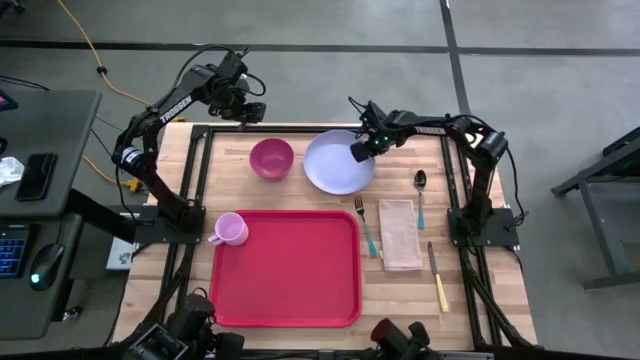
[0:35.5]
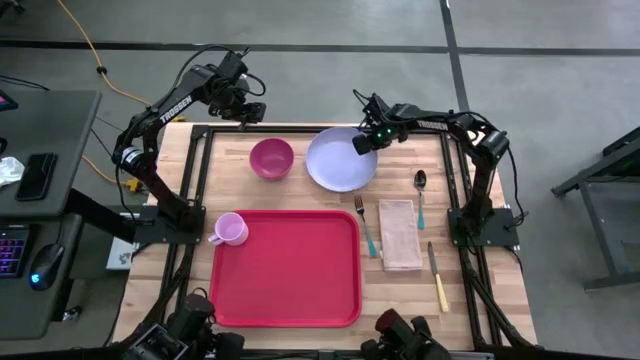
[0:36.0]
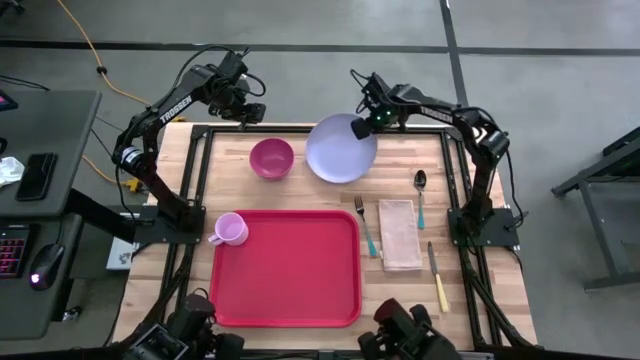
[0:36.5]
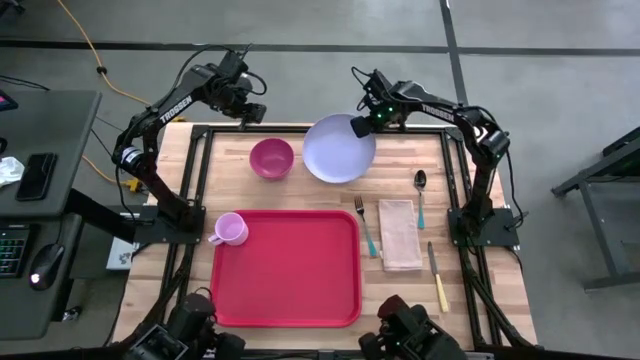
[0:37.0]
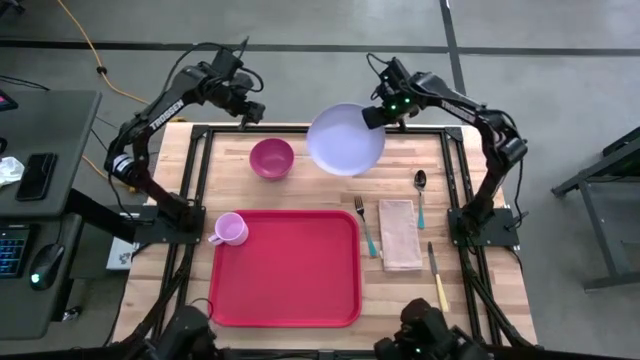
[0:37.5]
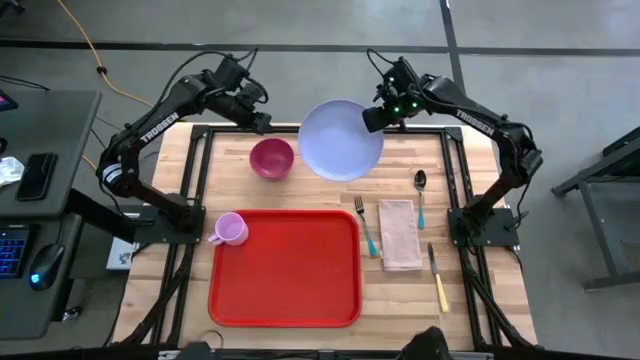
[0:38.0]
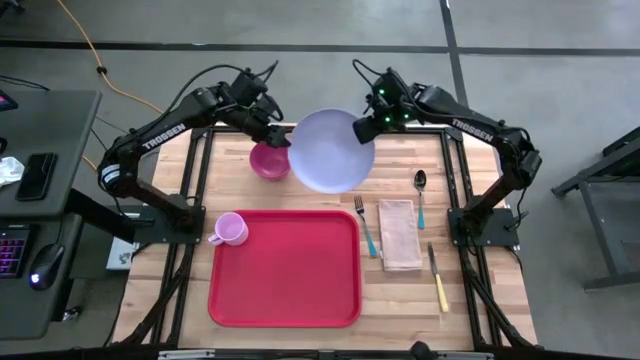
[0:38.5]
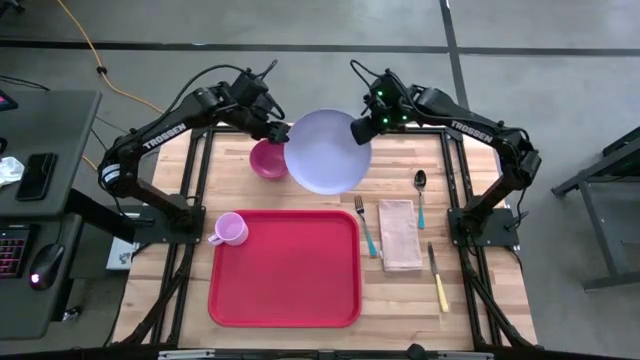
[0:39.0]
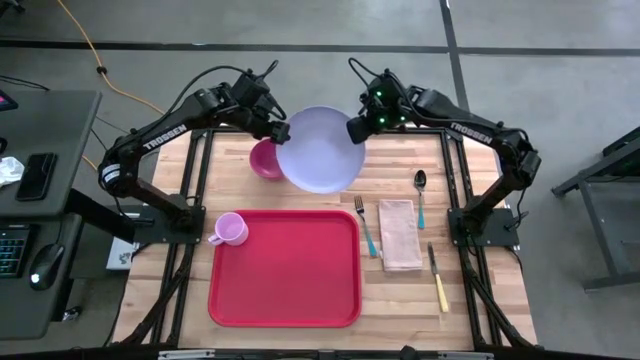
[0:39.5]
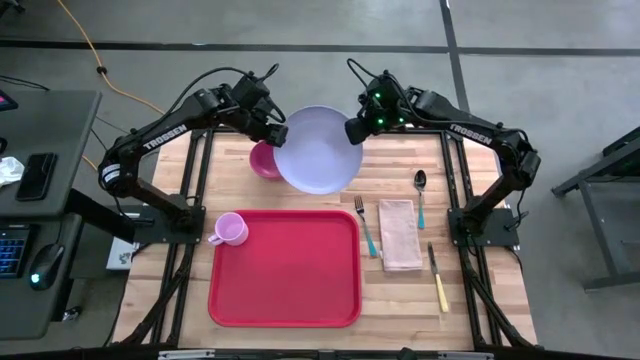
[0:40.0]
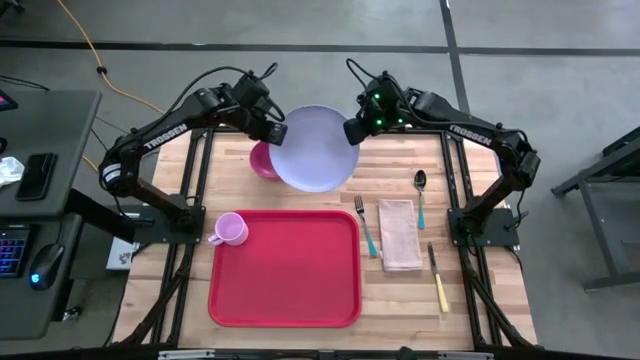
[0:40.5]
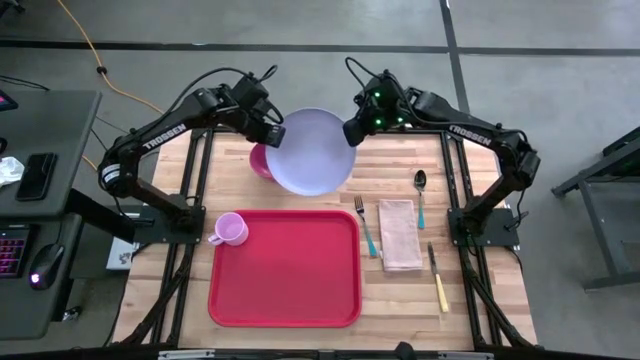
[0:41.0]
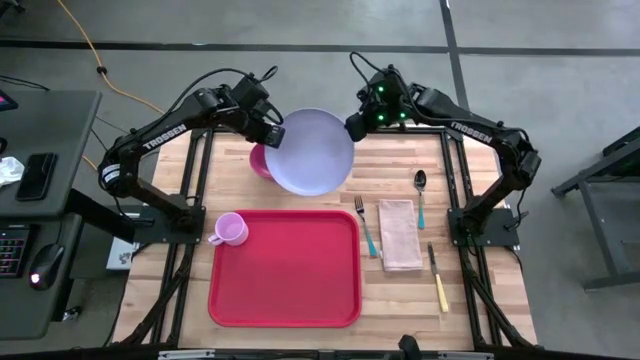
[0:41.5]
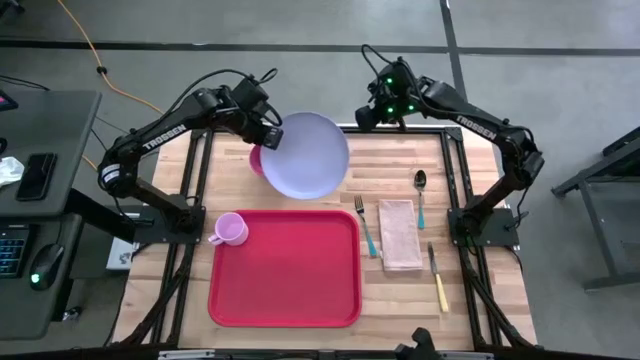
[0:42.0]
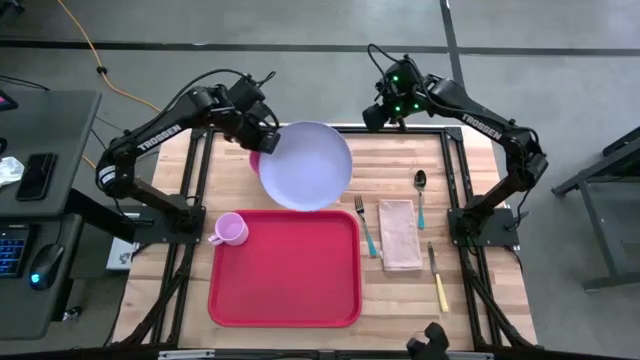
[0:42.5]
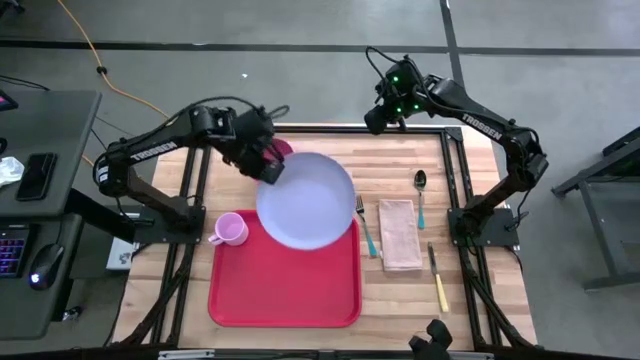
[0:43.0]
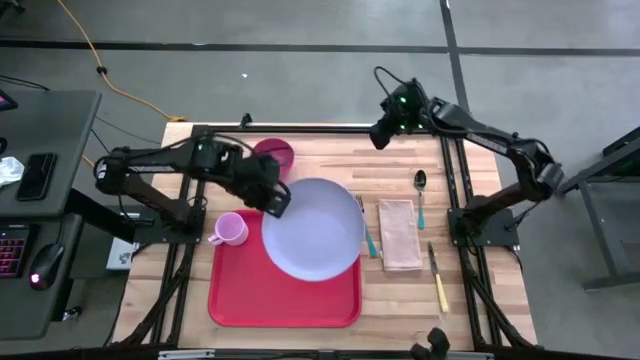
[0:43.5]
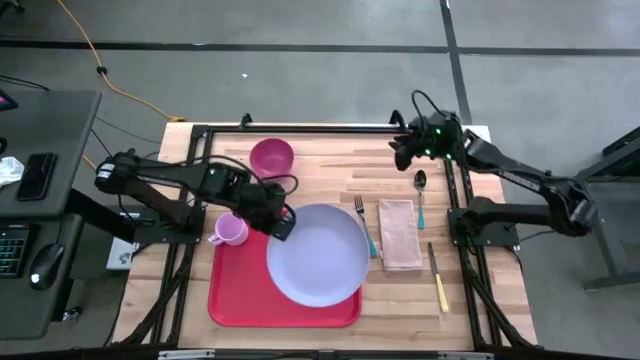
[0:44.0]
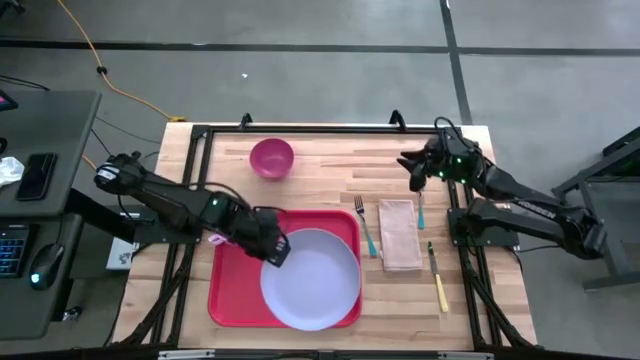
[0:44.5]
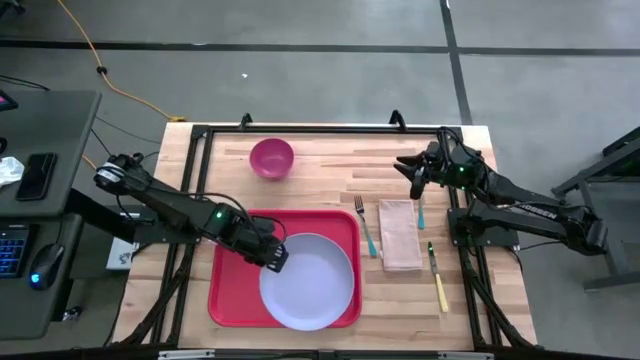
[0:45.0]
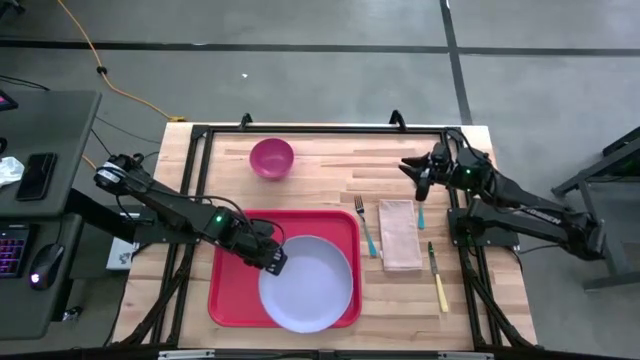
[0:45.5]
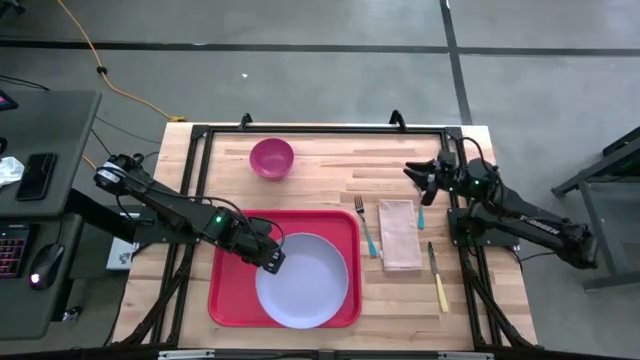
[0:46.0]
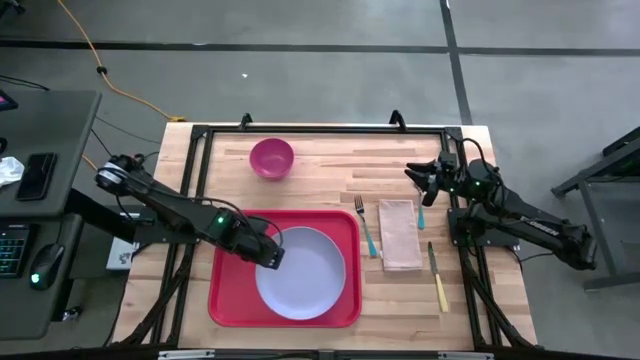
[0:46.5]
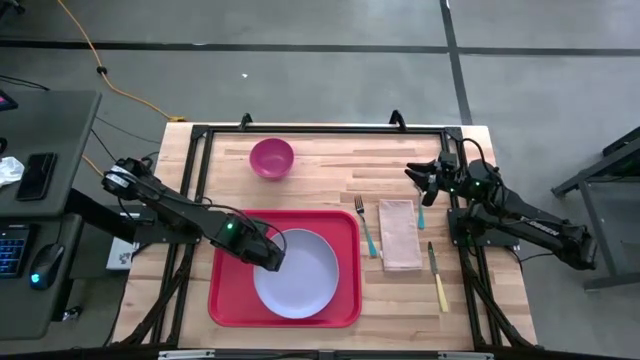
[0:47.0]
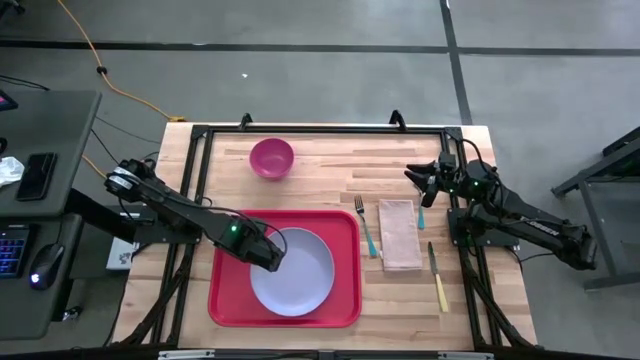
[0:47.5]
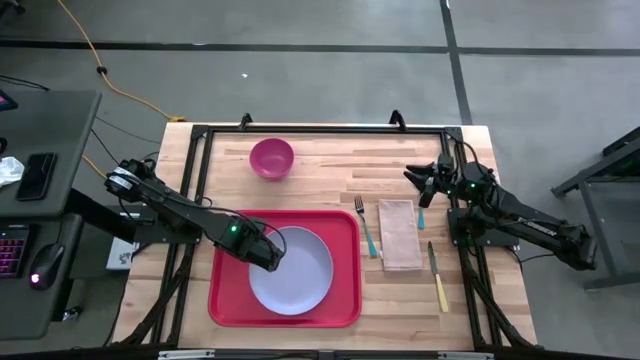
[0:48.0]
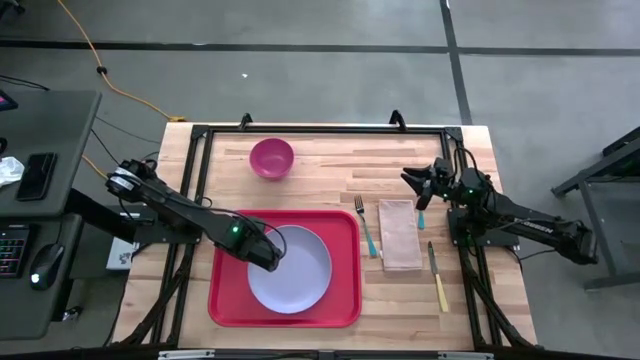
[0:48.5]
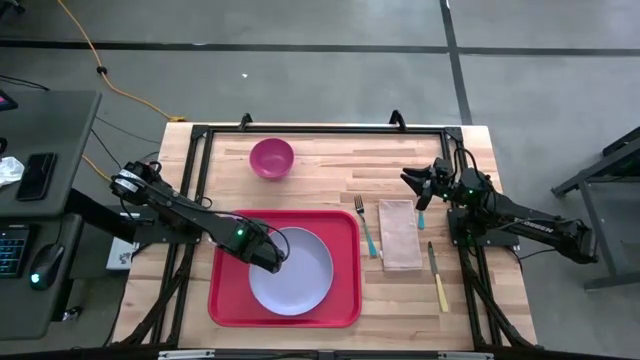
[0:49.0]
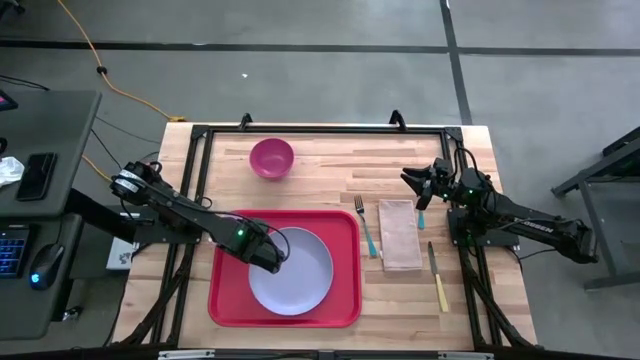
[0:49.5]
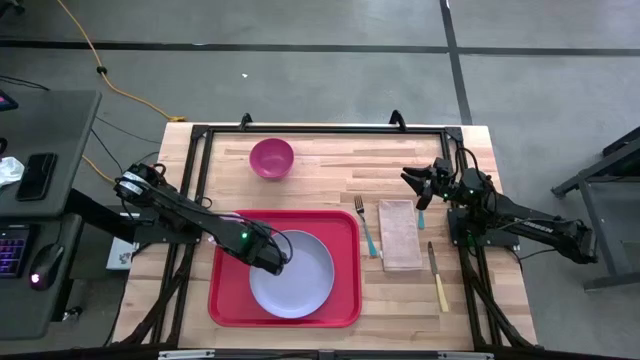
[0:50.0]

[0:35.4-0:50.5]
Task: Set up tray
Put the white plate to the bottom of the purple mug on the red tray

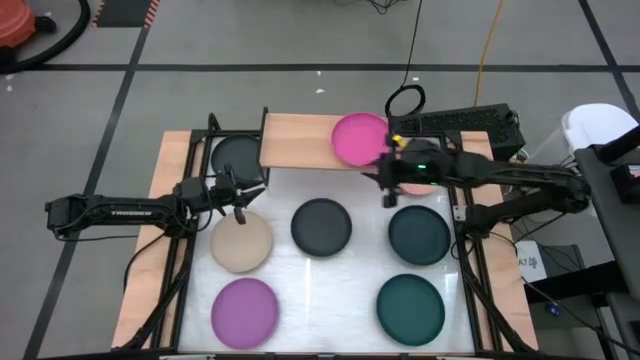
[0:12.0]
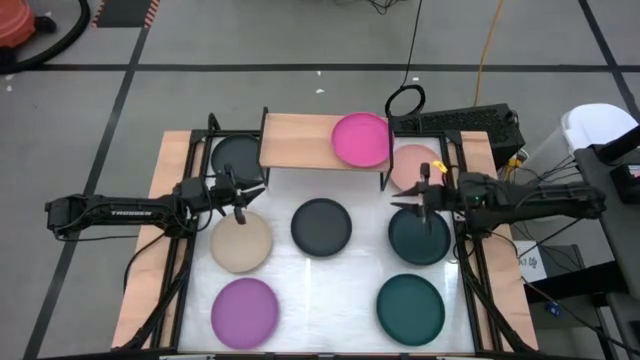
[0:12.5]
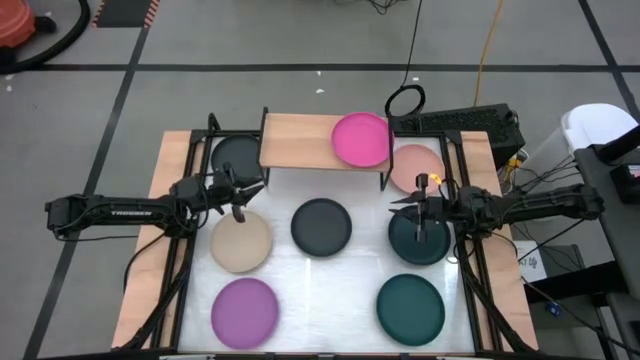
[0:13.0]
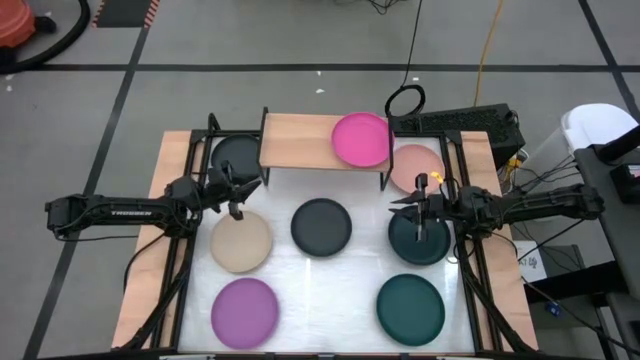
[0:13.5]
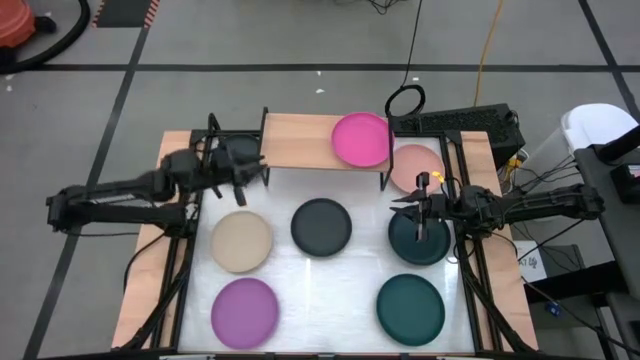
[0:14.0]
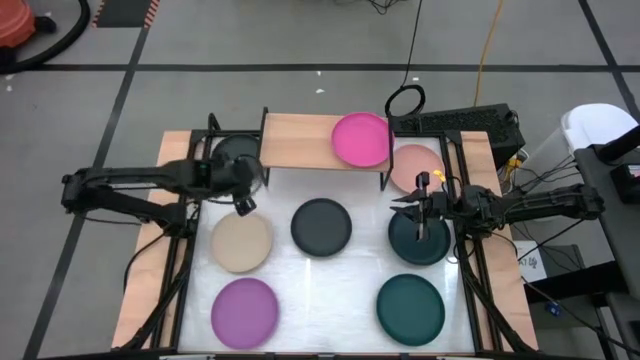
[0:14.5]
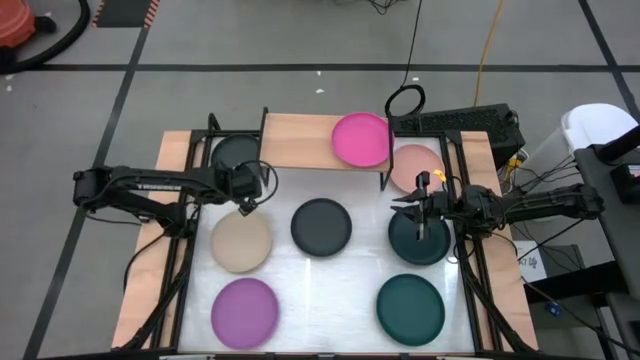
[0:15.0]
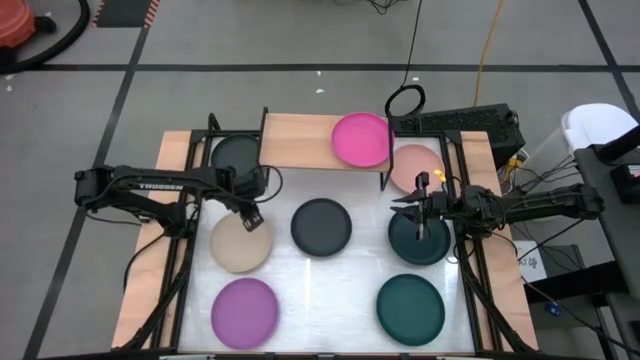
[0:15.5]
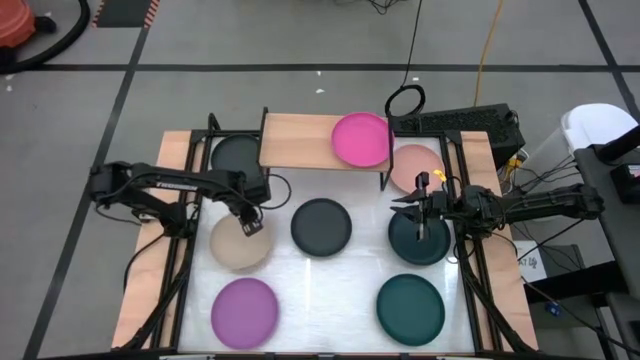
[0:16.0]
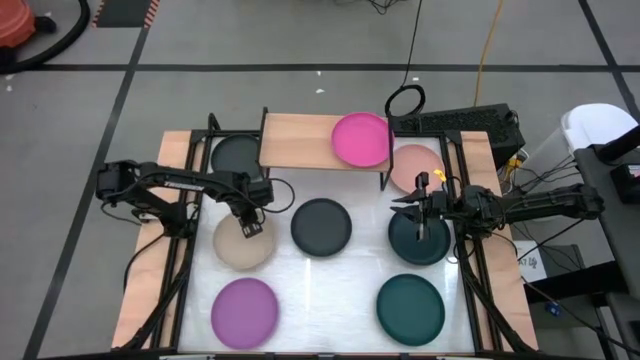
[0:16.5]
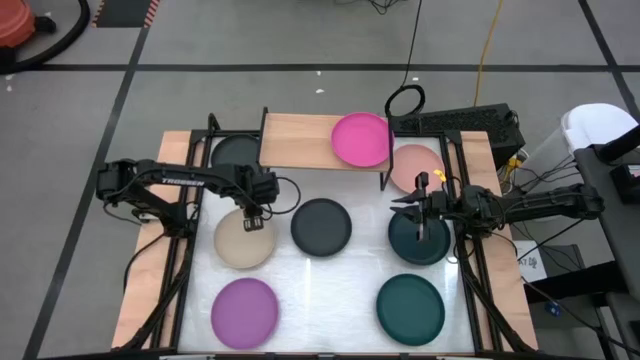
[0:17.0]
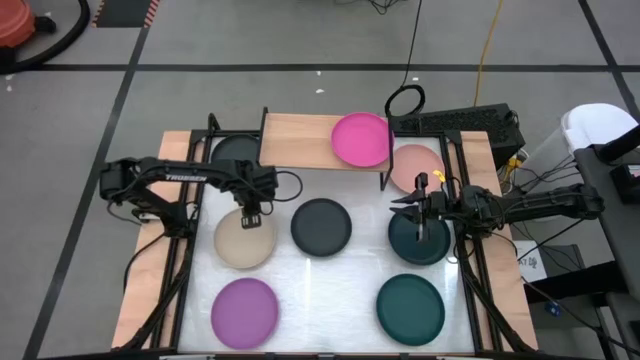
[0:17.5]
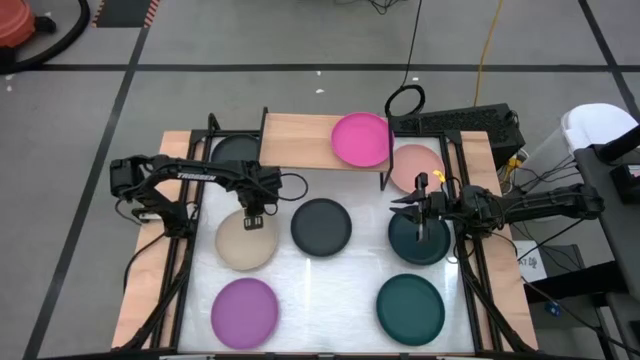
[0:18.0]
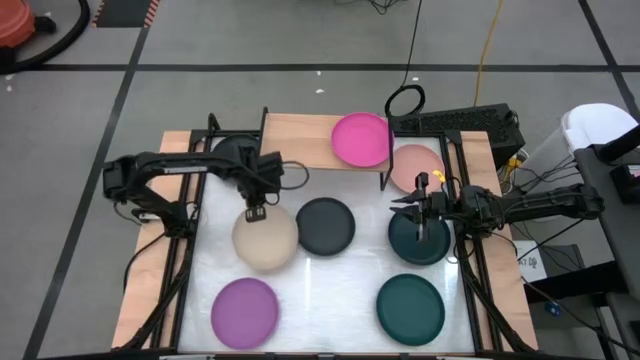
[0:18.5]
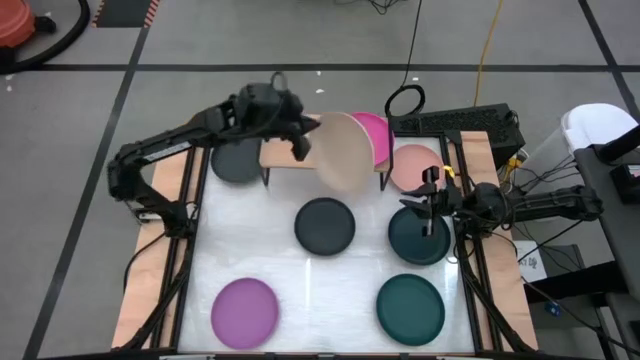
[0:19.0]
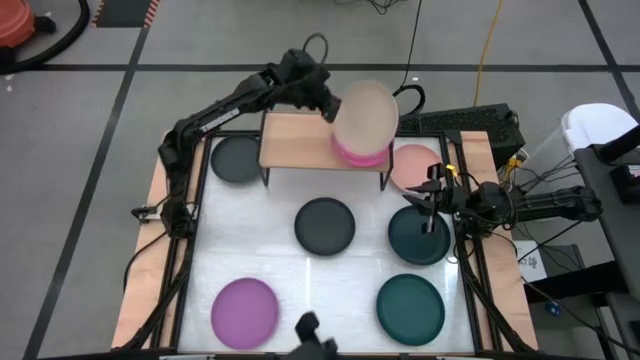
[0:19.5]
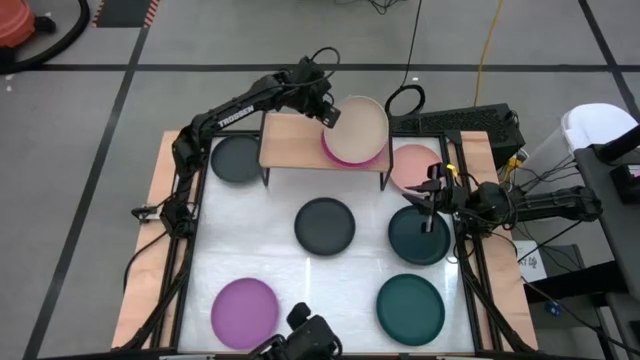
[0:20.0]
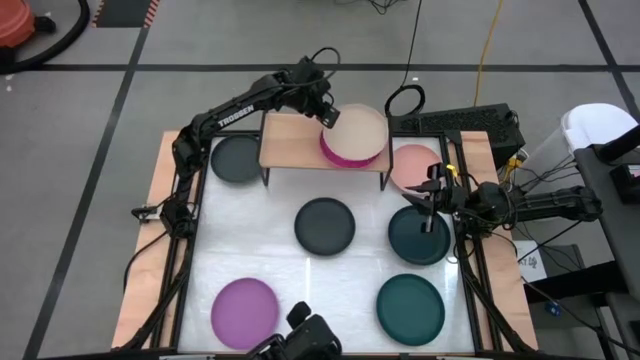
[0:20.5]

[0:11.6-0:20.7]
Task: Place and stack plates onto a shelf
Stack the gray plate on top of the pink plate on the shelf
